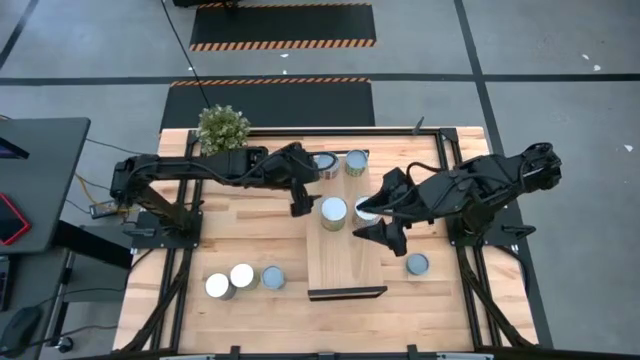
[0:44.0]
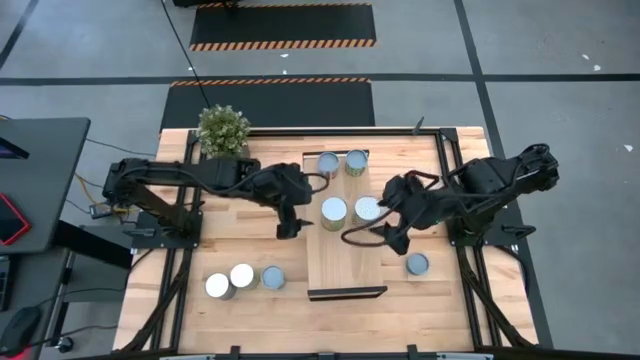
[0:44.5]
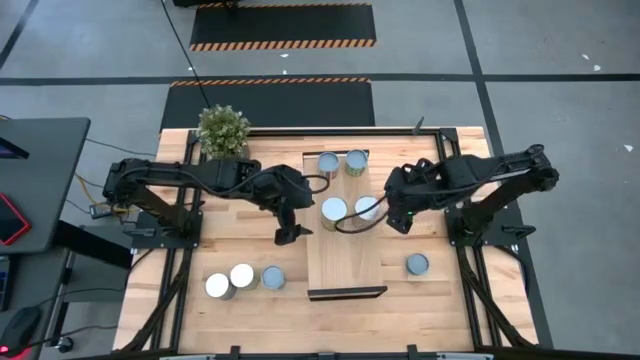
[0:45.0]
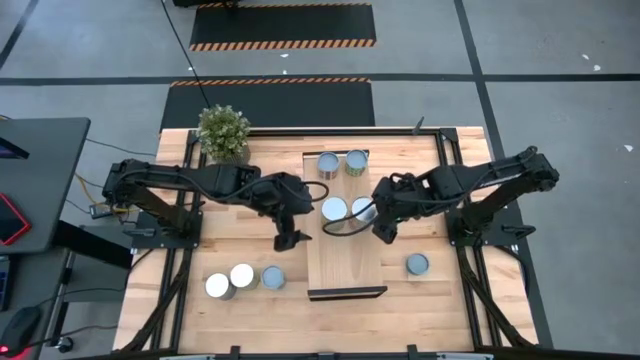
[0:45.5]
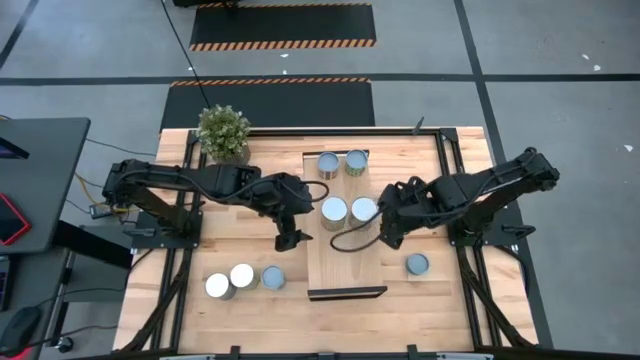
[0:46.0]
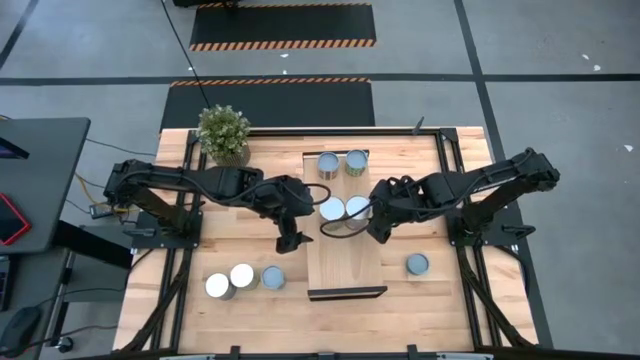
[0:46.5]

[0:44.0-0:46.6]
Task: Pick and place cans onto a shelf
Adjust the cans on the shelf

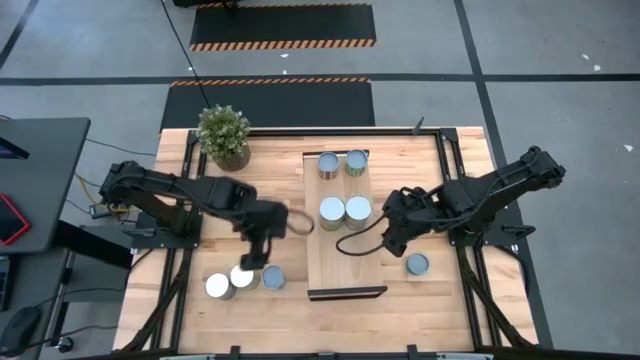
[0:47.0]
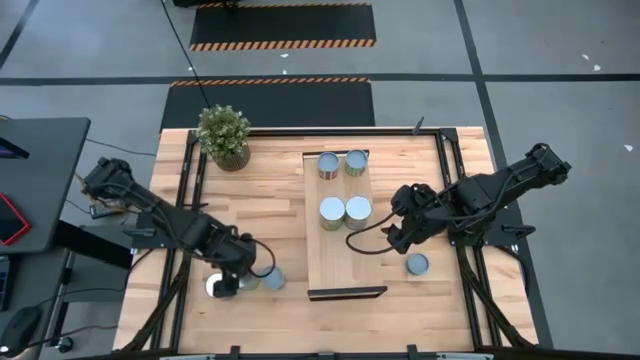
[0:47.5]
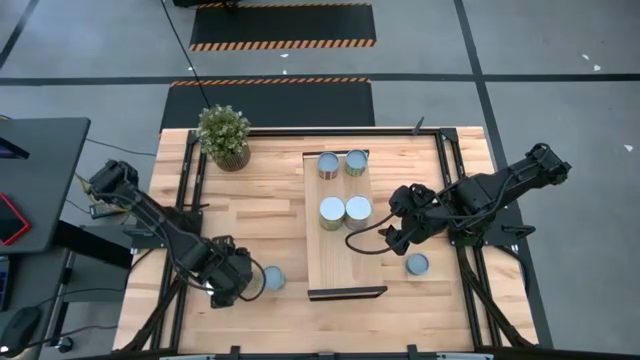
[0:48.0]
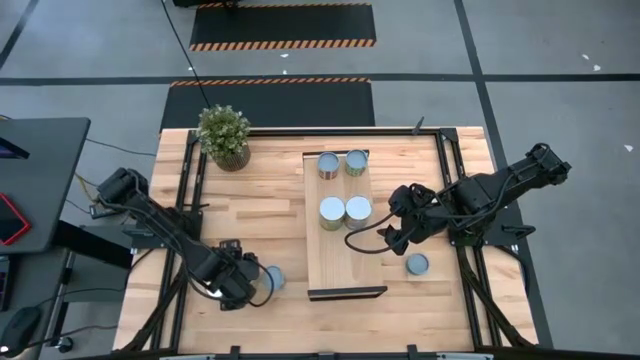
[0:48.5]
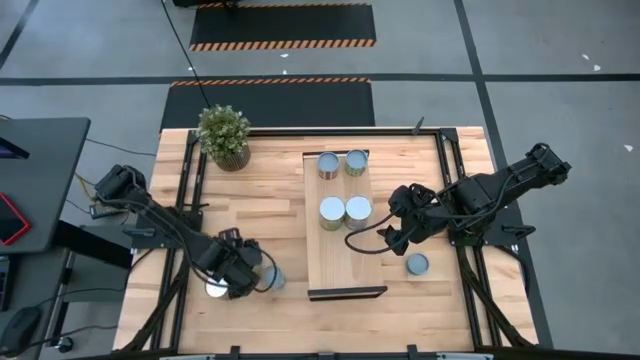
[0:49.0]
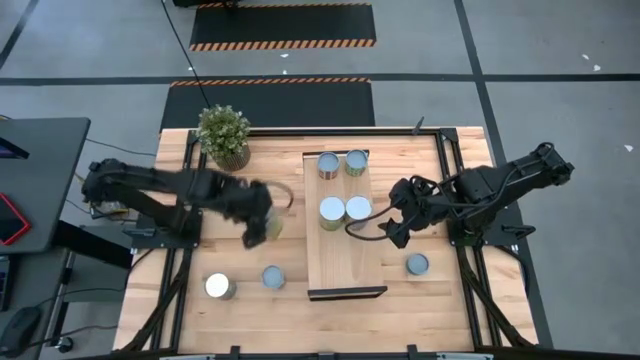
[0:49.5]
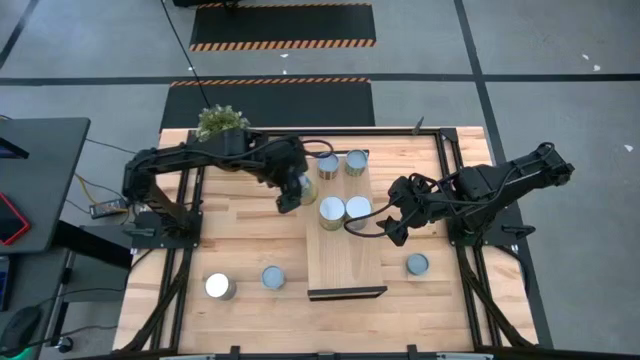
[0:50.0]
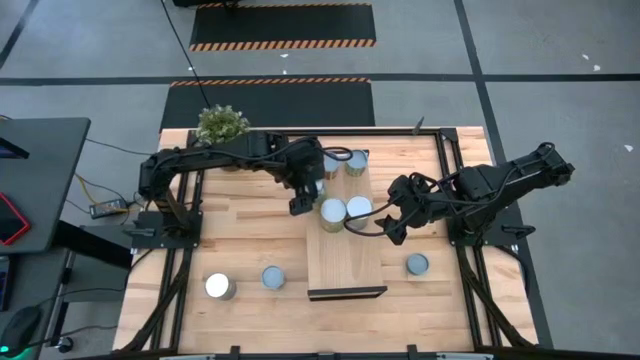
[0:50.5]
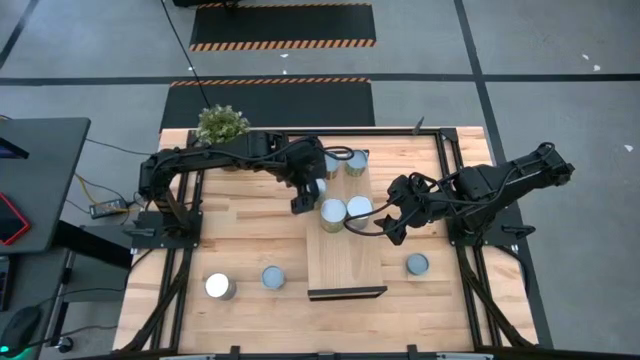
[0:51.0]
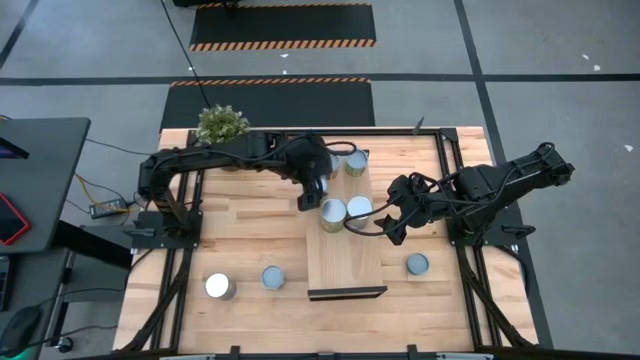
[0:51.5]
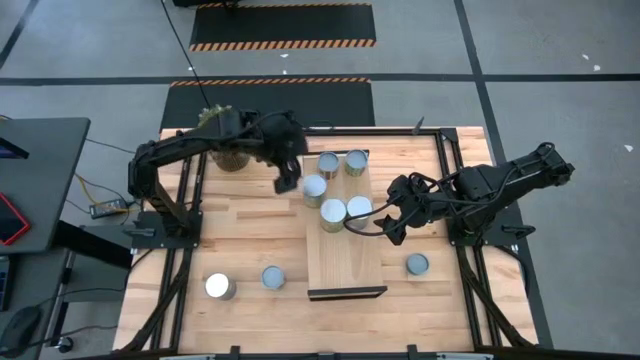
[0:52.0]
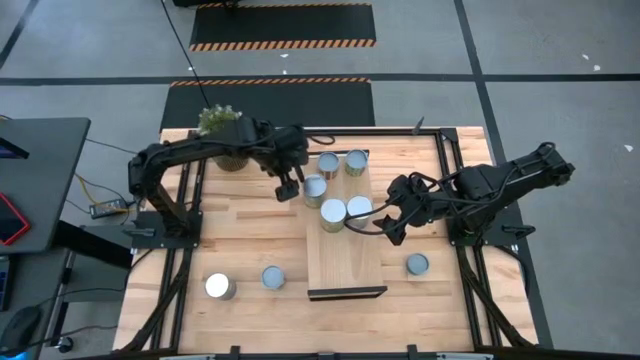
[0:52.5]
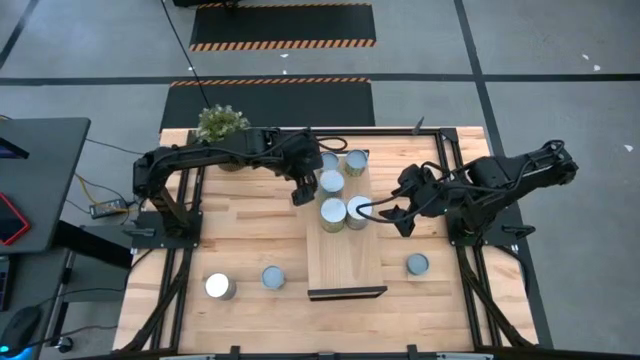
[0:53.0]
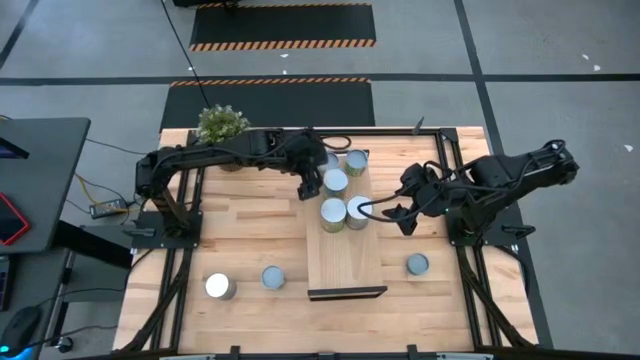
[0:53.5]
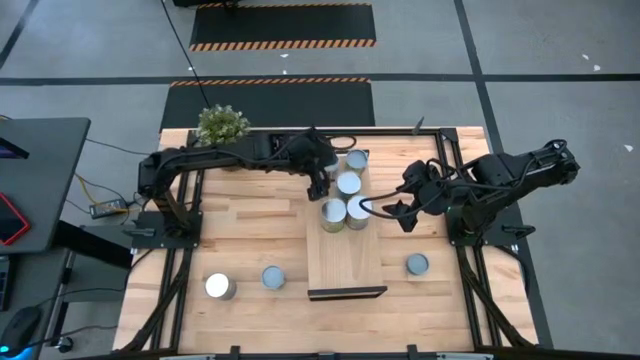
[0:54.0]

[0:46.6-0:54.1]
Put the canned carrots on the shelf

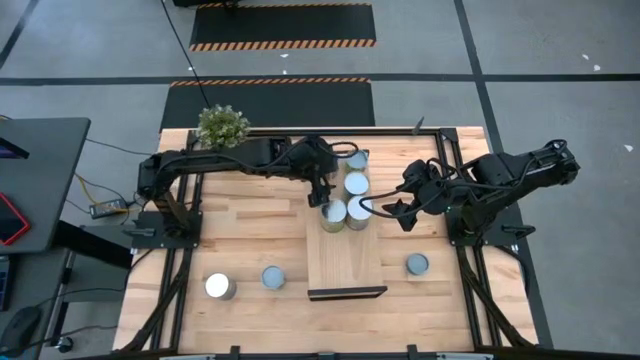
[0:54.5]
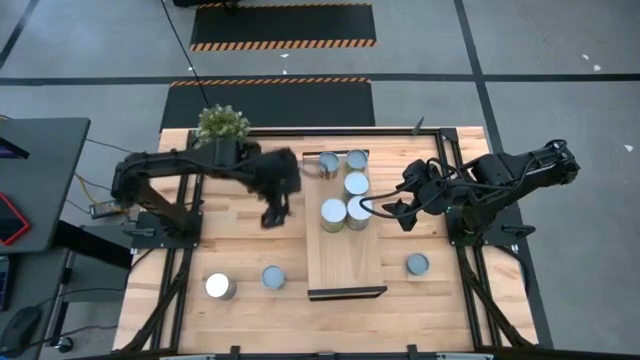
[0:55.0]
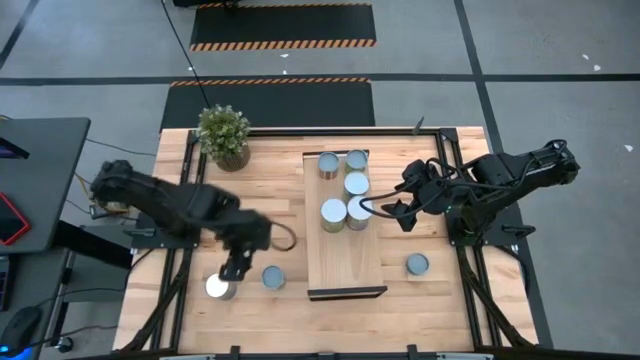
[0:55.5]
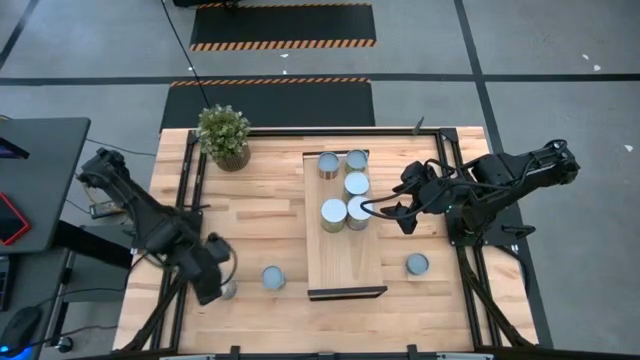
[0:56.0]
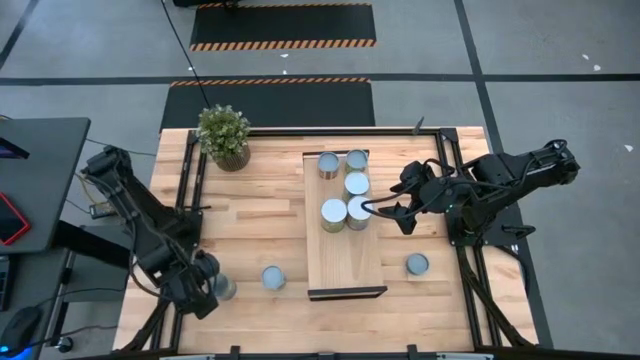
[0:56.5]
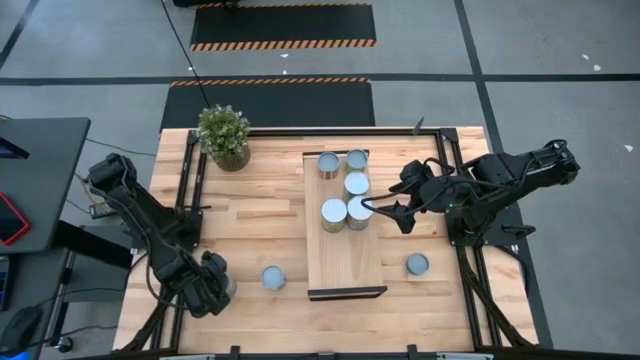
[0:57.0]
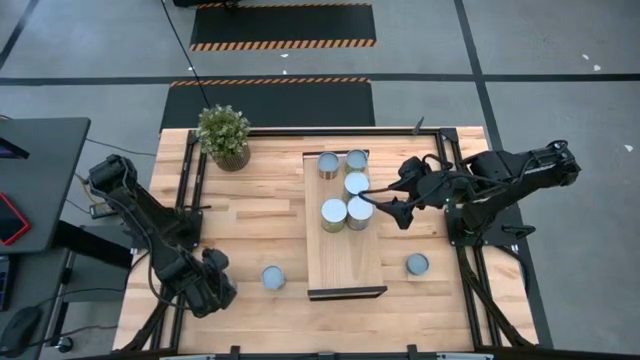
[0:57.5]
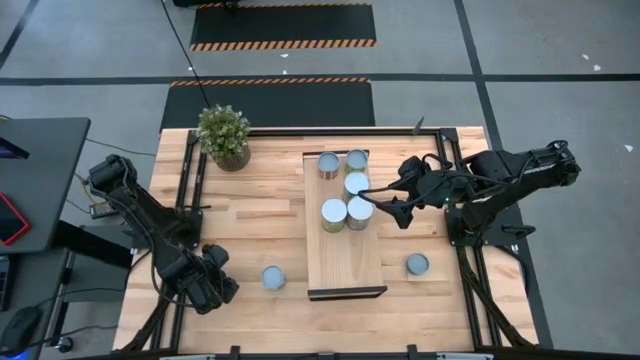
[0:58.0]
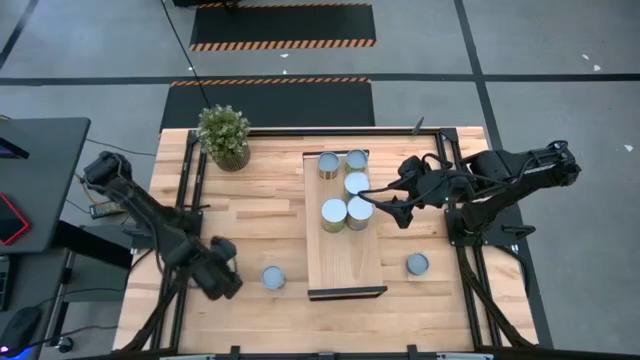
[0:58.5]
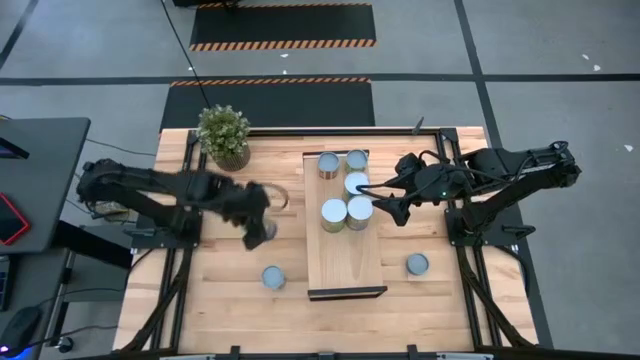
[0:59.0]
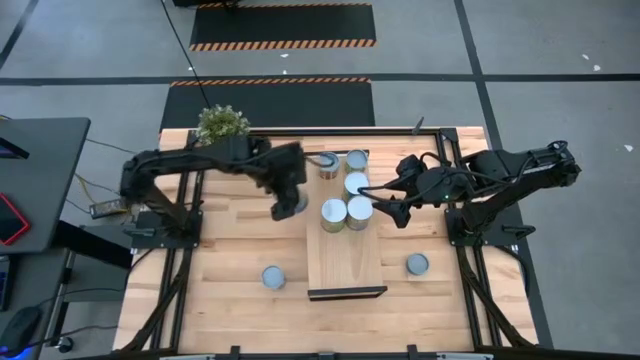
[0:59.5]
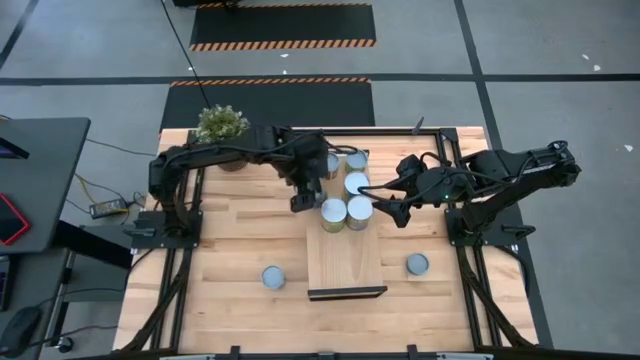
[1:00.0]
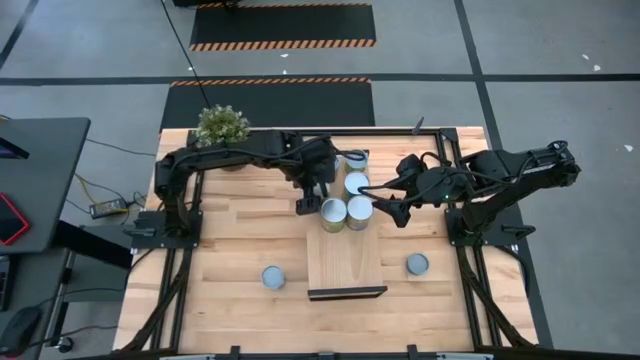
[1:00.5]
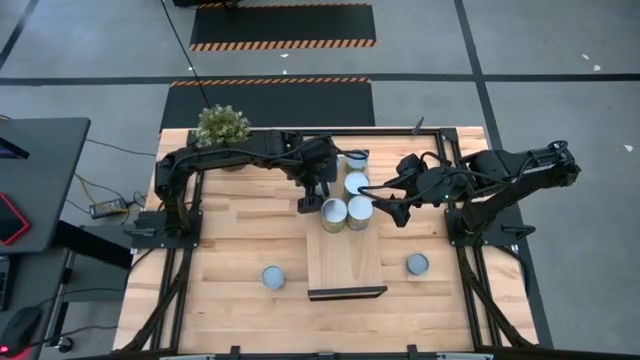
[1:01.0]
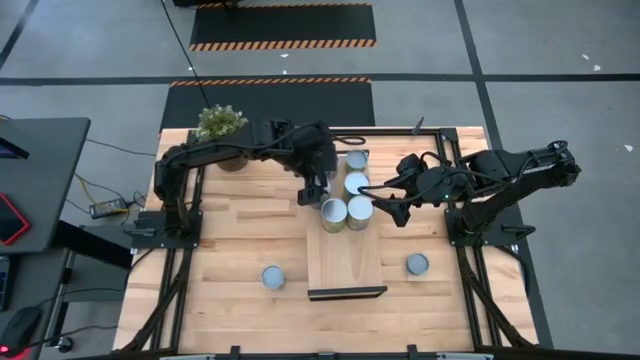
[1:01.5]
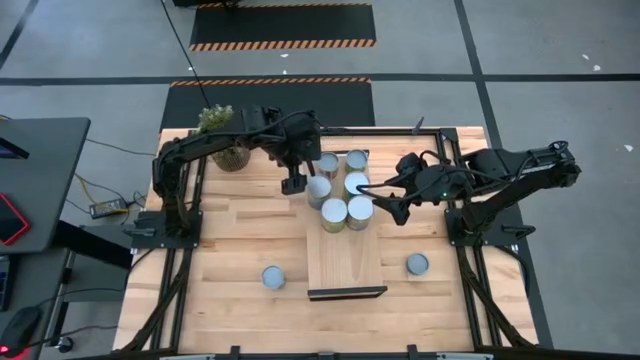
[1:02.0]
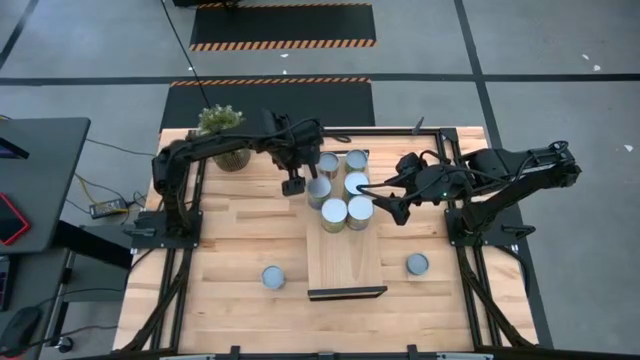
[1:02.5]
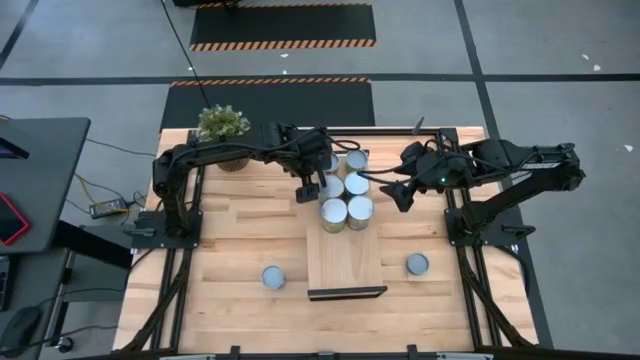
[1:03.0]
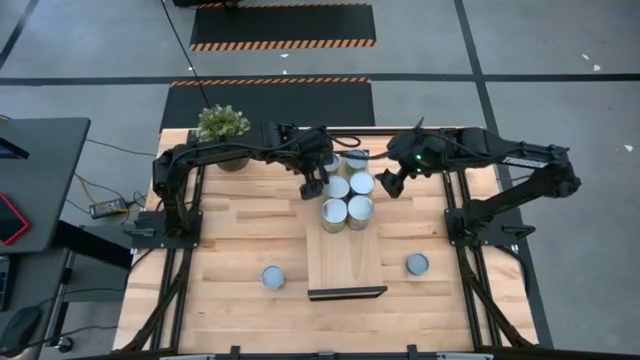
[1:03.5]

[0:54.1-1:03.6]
Put the canned green peas on the shelf
